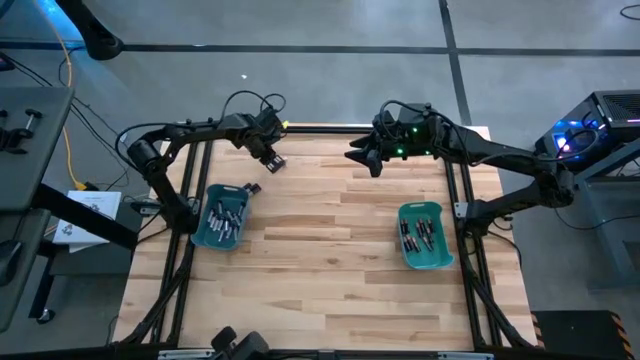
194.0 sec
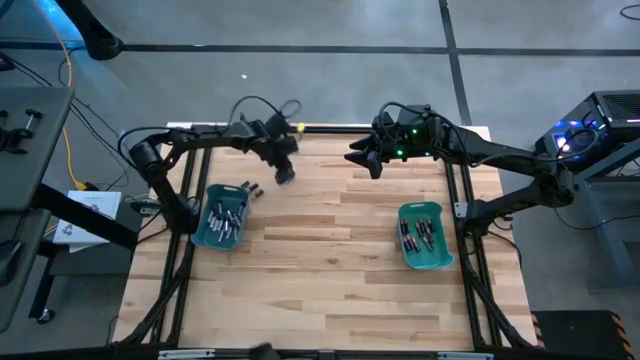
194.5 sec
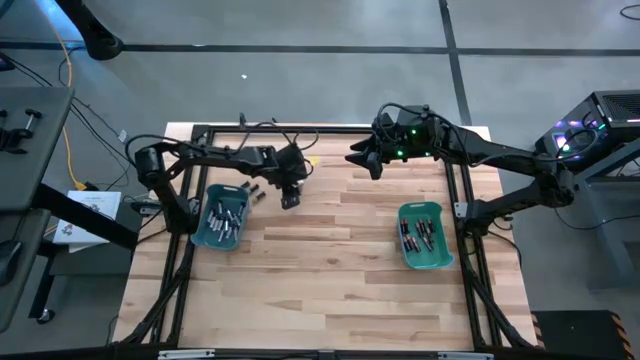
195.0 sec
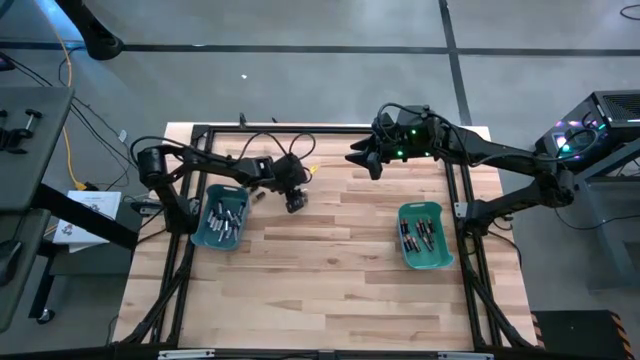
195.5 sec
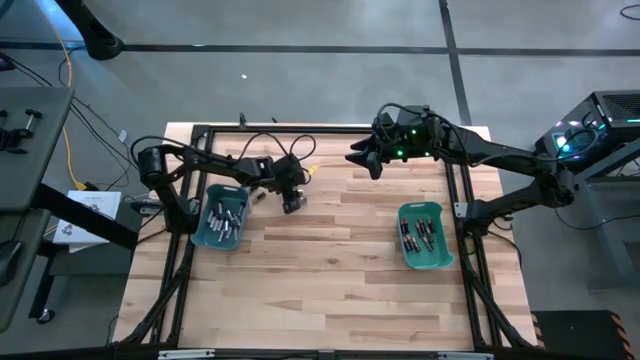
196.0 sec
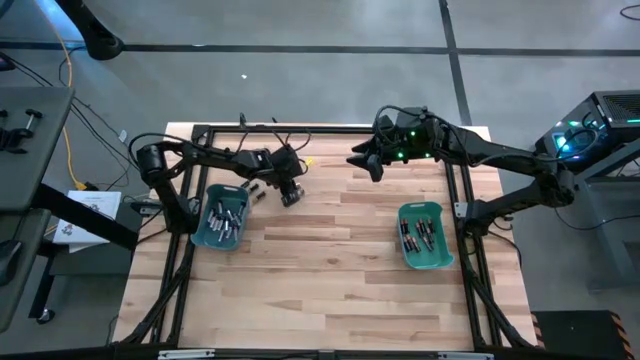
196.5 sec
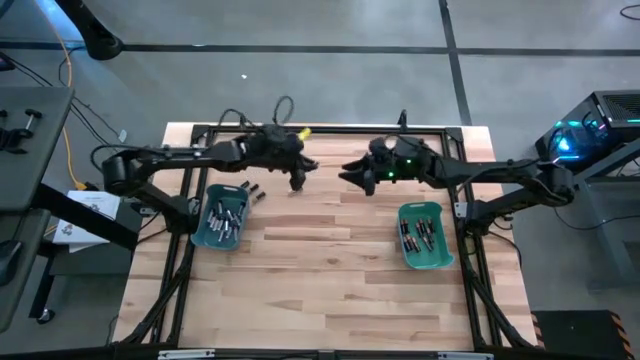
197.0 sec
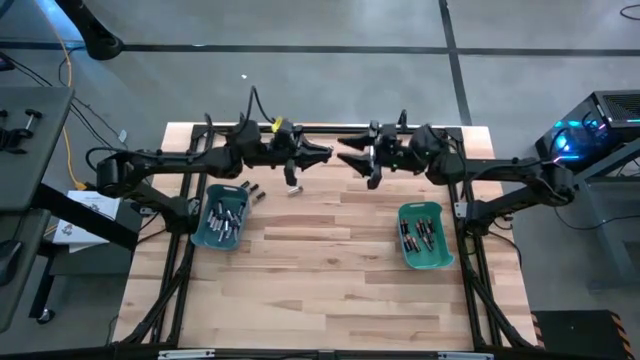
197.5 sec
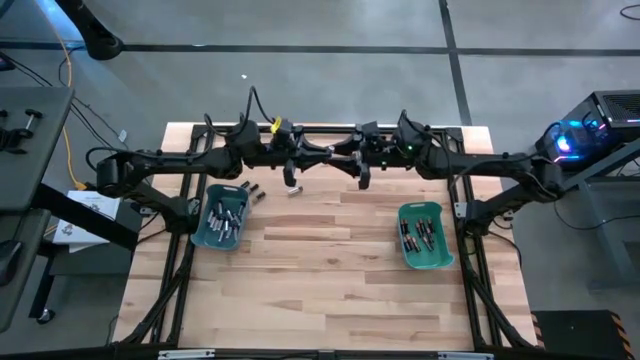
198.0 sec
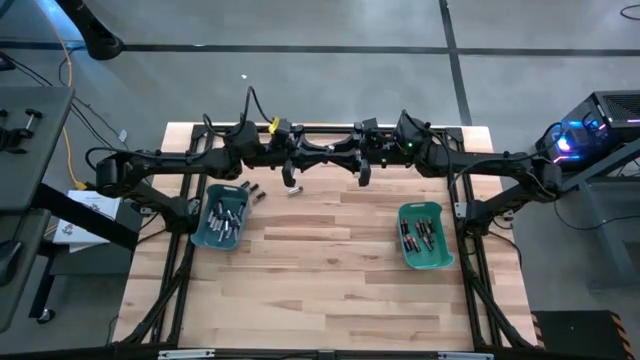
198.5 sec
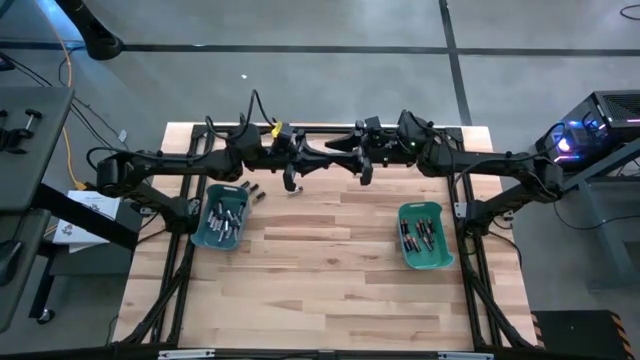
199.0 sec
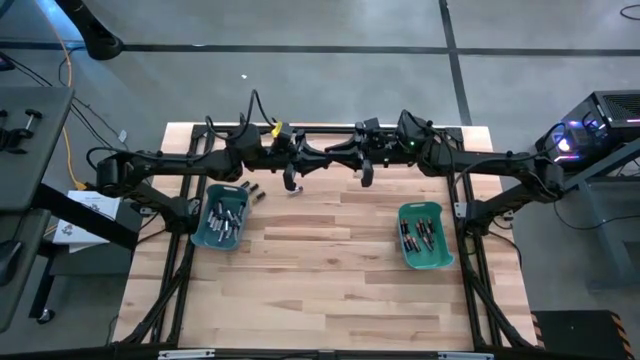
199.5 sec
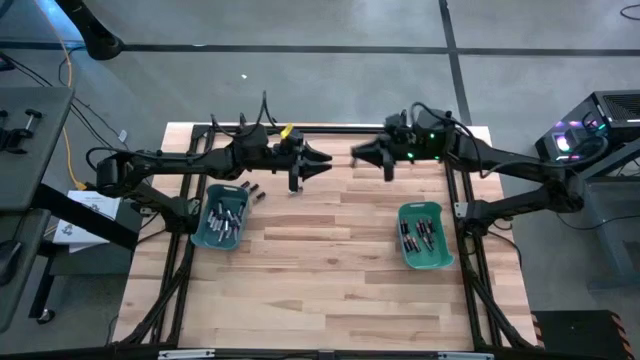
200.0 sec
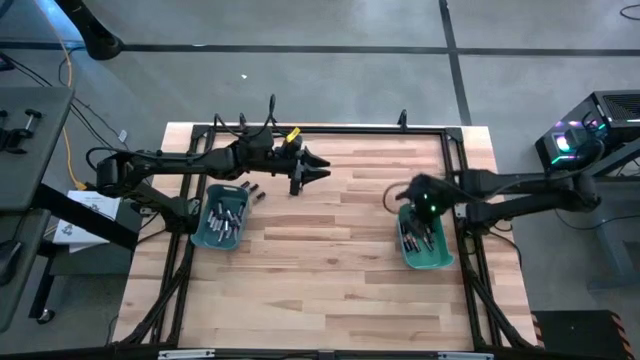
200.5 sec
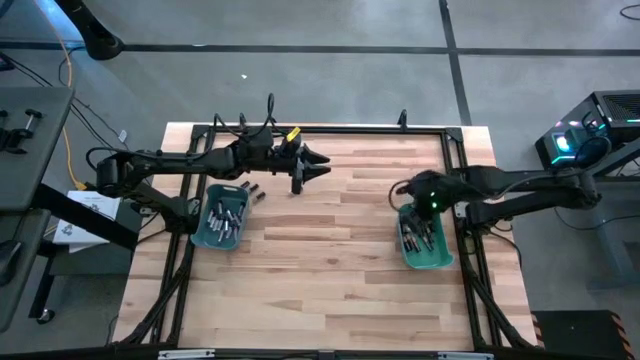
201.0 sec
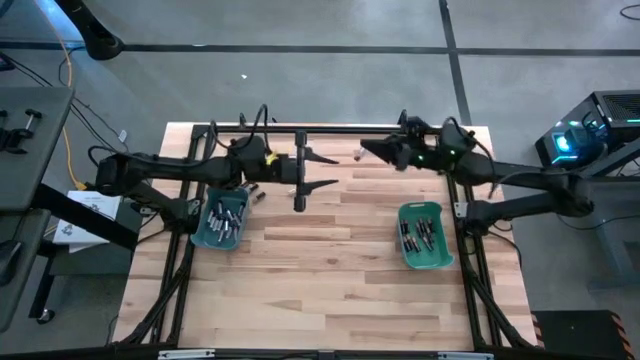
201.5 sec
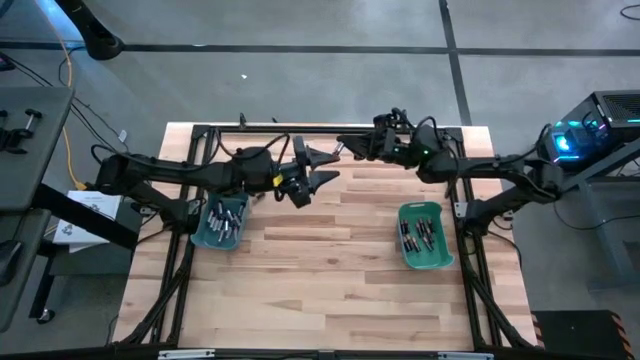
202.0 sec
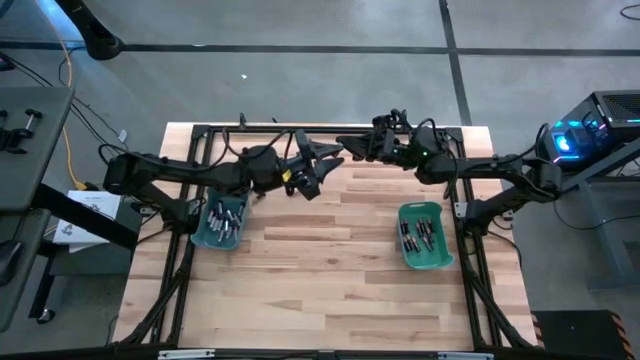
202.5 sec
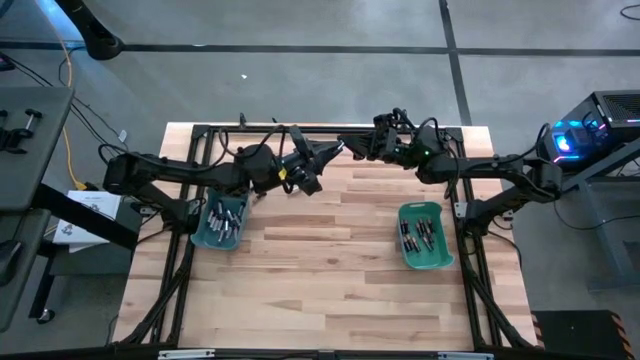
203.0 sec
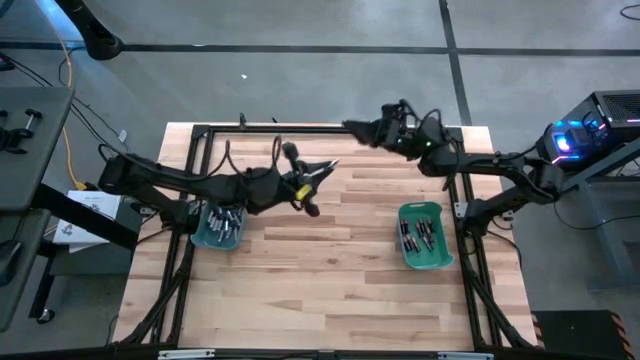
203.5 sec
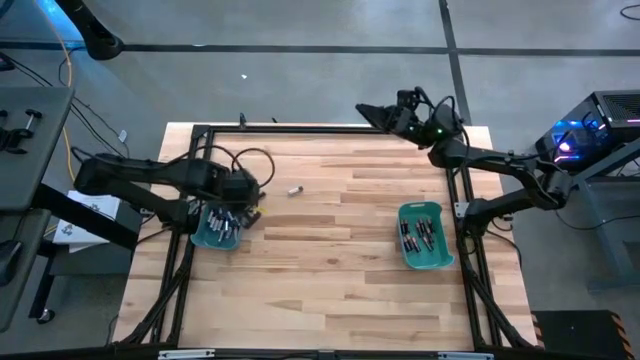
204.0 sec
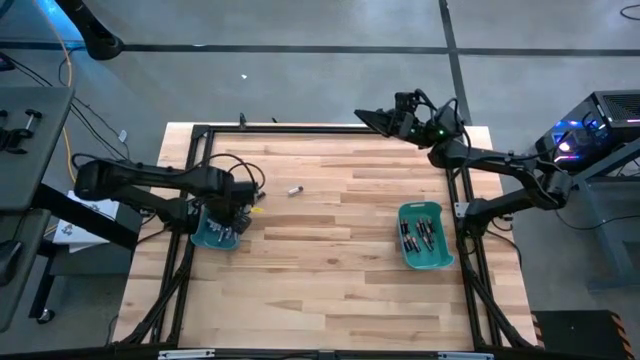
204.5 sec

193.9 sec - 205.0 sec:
Task: Sort batteries
Put the silver battery into the blue bin

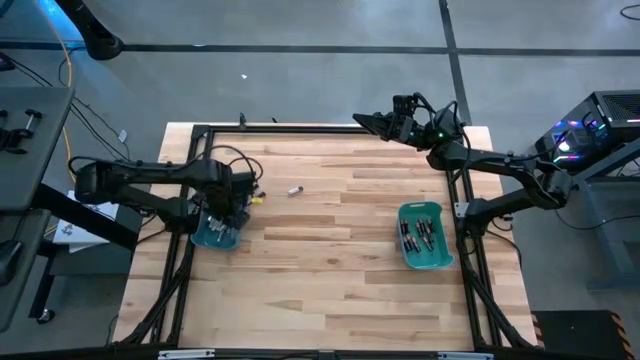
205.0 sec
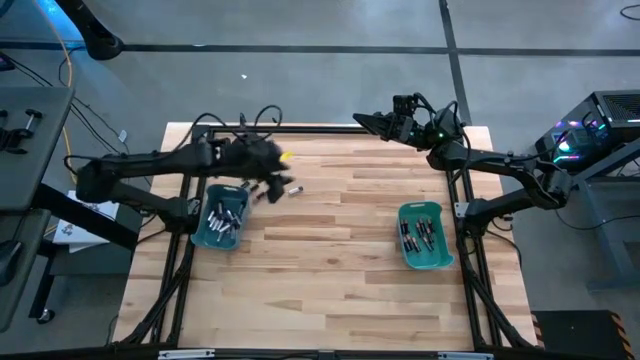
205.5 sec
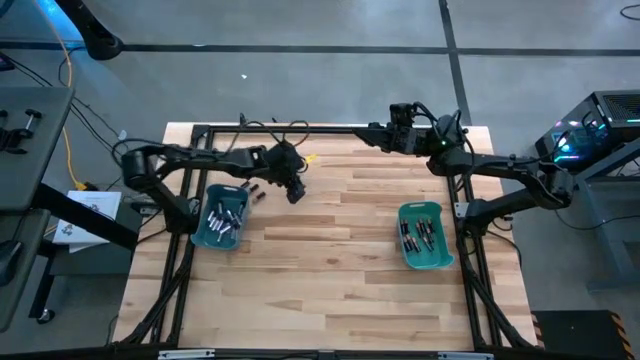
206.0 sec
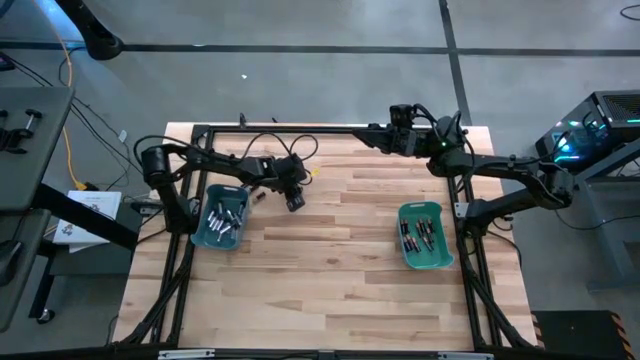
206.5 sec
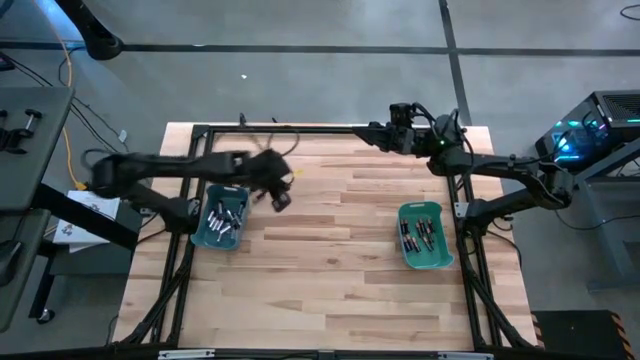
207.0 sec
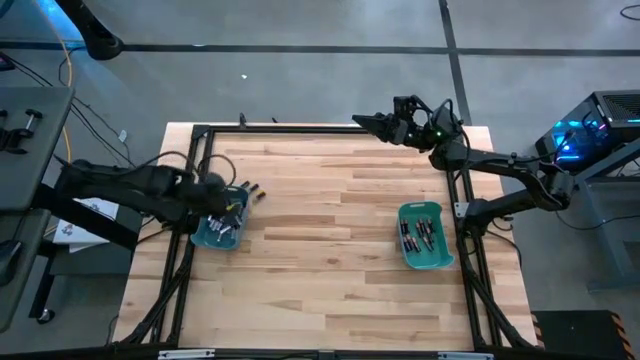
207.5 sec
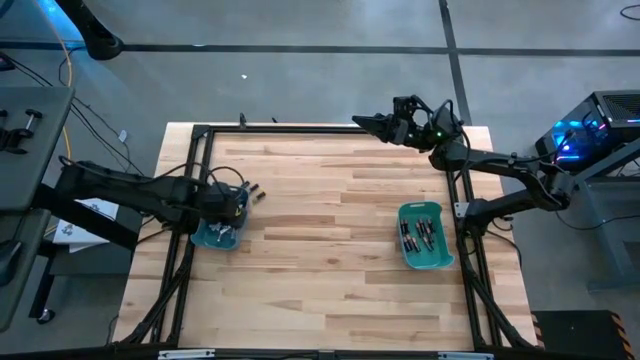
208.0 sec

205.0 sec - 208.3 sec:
Put the silver battery into the blue bin

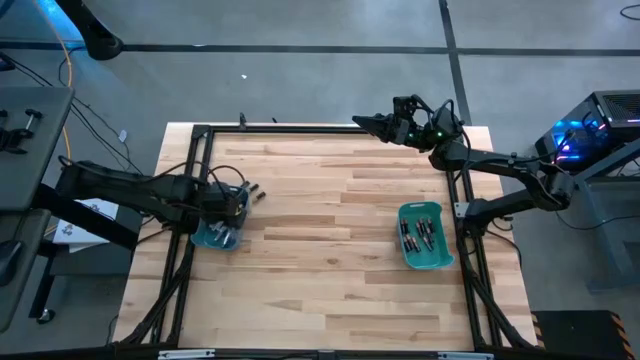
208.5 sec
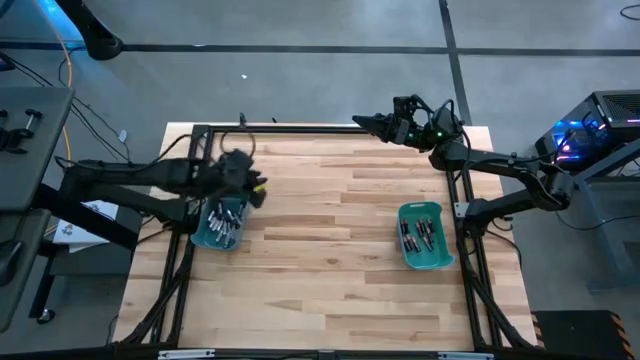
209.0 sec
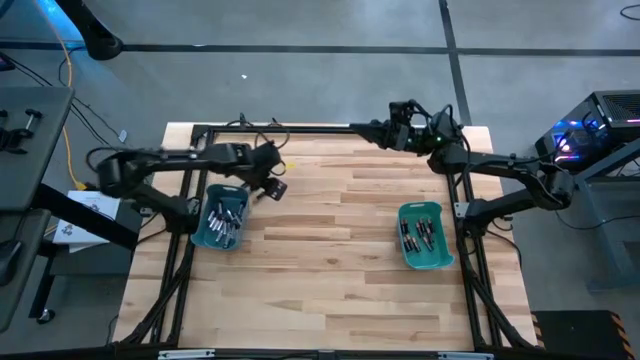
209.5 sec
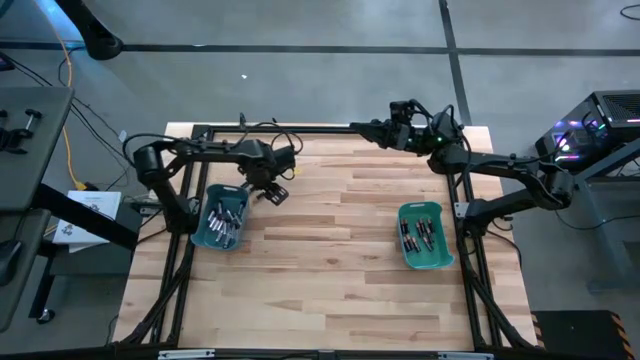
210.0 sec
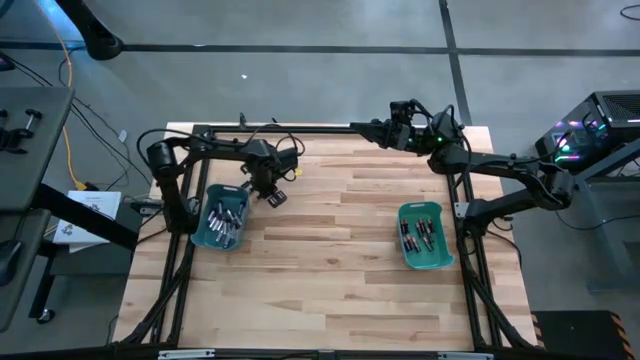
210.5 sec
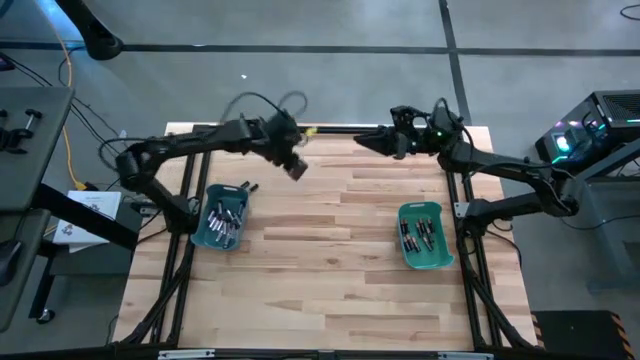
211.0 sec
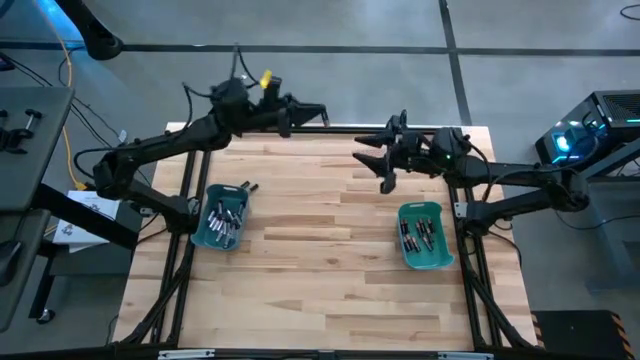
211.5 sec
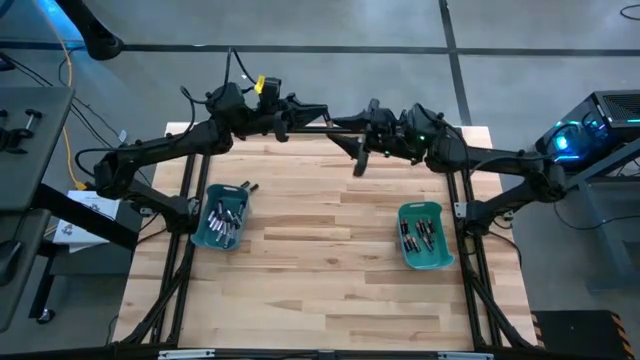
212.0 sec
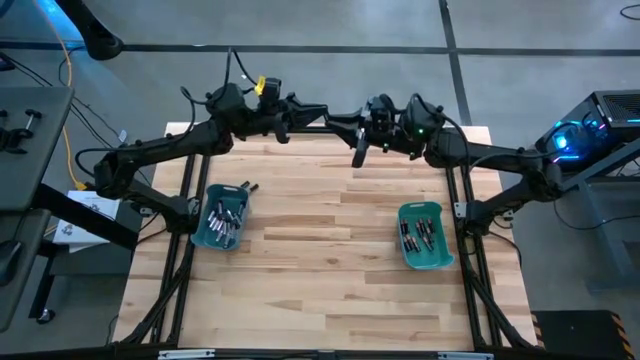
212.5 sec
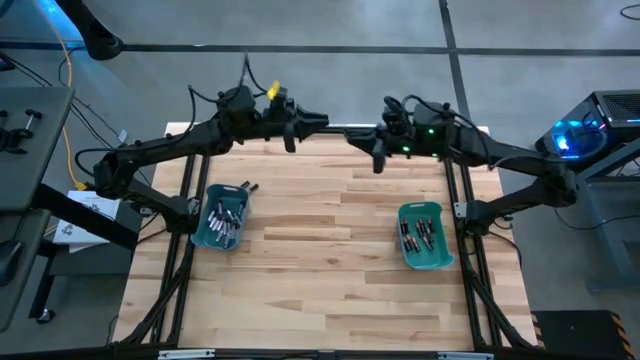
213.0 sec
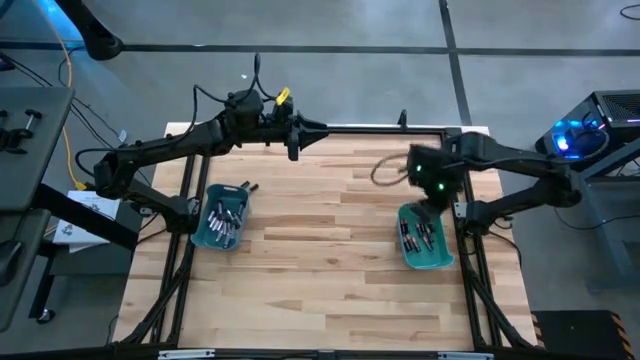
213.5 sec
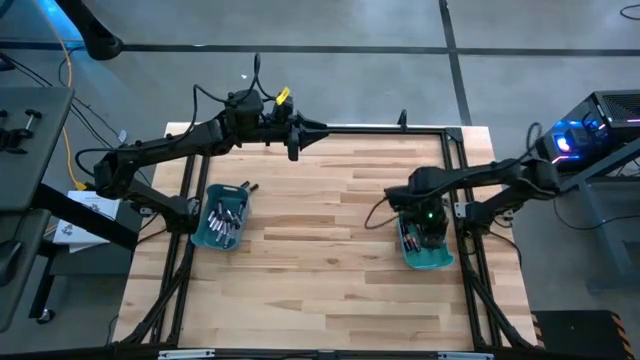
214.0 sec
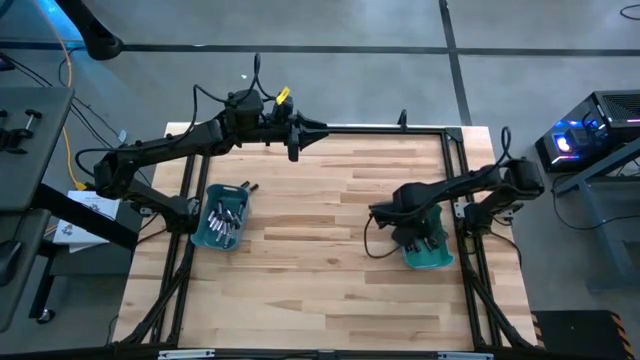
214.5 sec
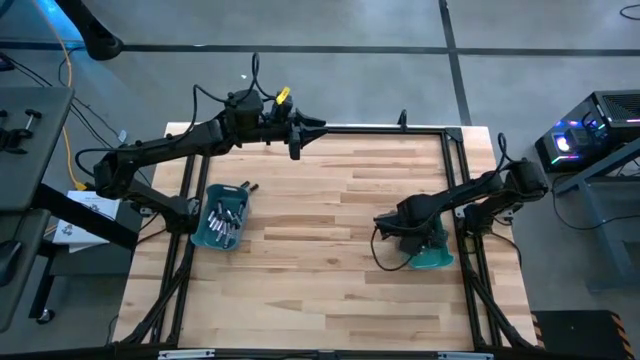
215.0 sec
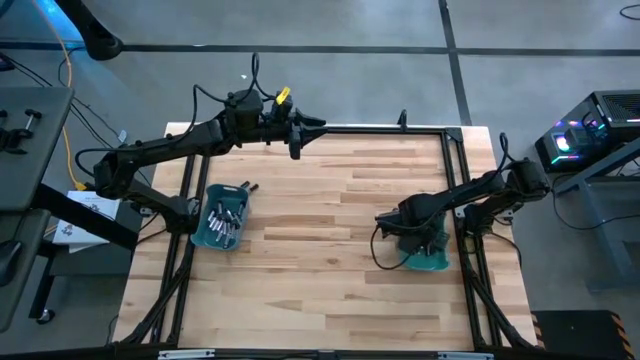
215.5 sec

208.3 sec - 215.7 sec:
Put the black battery into the green bin
